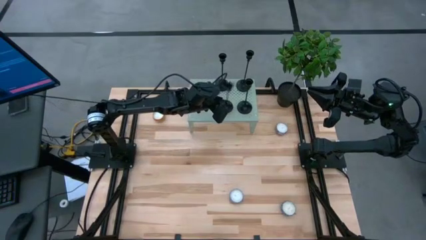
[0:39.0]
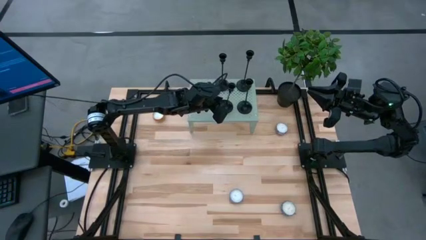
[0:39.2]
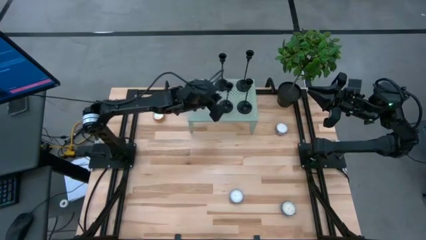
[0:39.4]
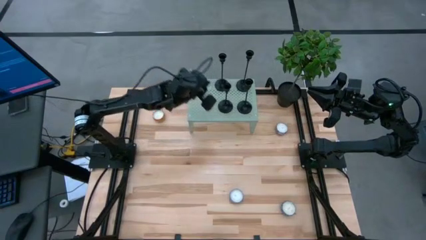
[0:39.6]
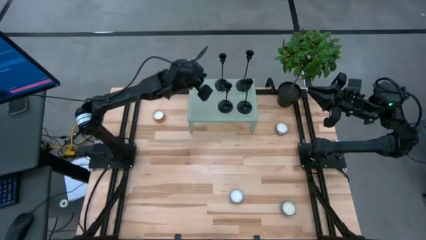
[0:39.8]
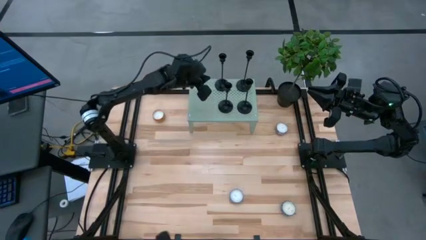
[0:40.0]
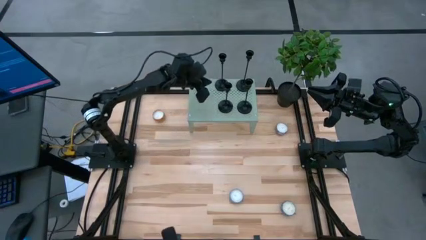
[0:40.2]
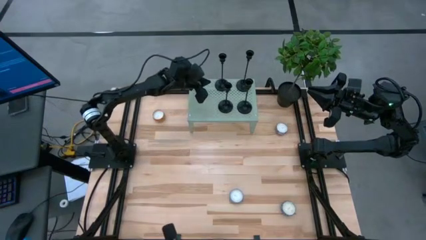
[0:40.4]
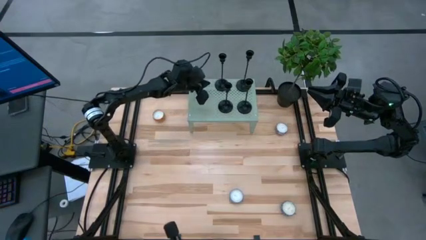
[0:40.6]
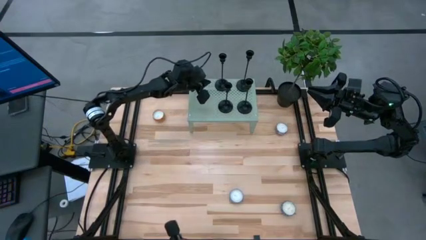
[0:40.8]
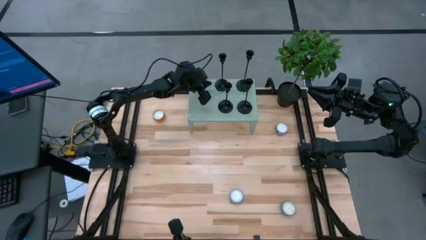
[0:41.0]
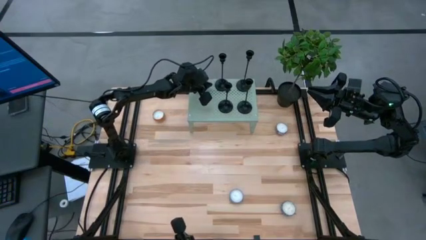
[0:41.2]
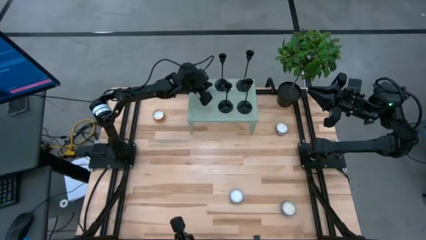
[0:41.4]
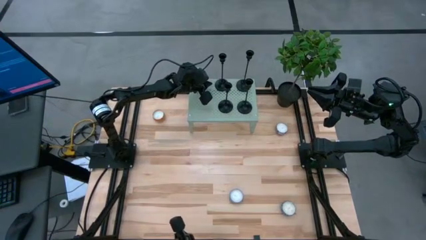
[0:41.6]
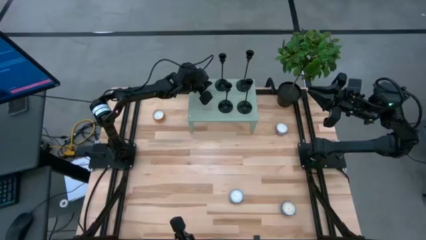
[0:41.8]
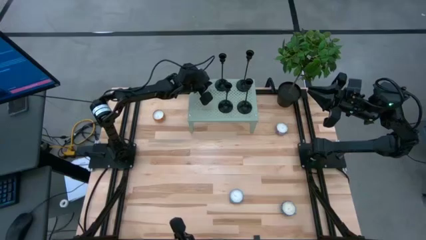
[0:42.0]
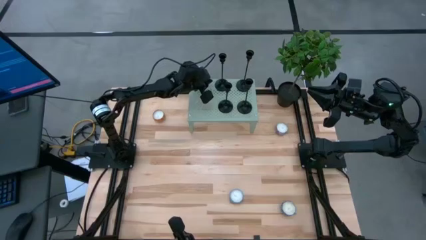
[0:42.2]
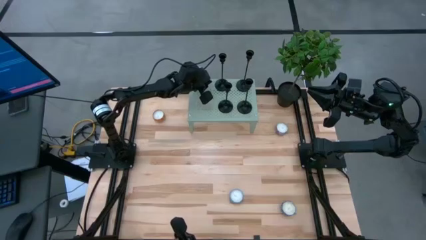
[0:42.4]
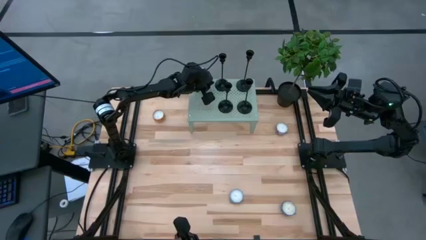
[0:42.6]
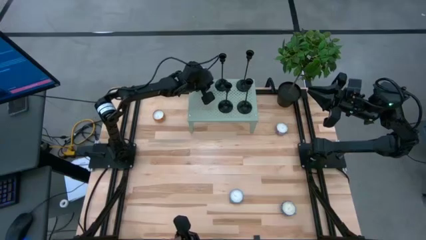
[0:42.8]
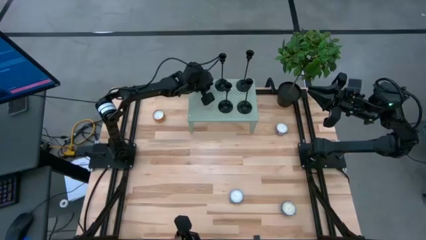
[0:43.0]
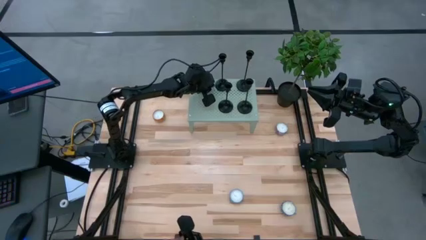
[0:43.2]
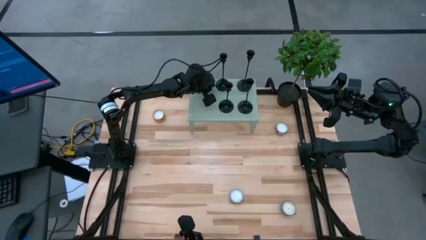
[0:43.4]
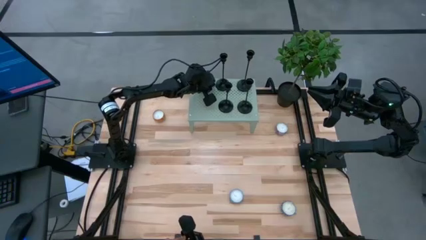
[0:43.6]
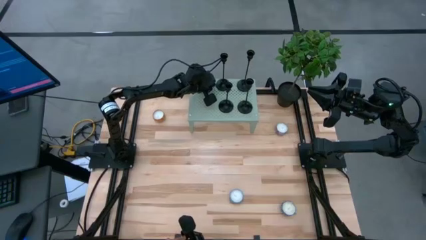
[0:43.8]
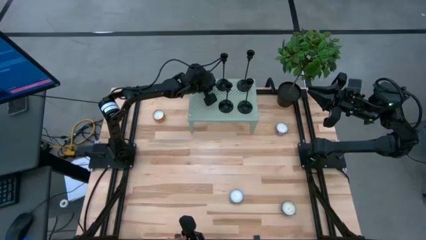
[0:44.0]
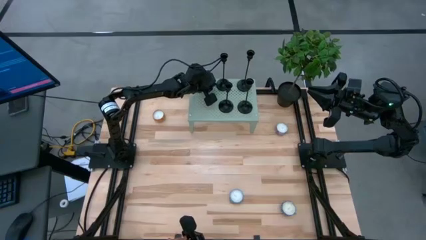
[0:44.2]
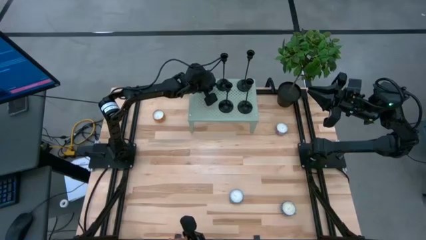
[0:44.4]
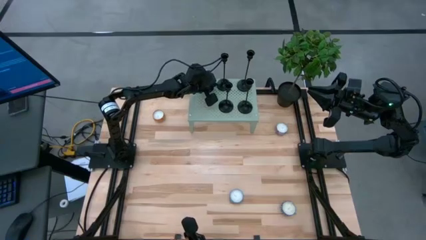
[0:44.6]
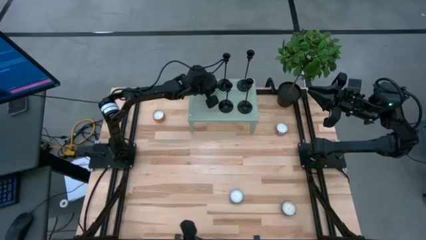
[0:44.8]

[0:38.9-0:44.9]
Task: Pick & Place candle stick holders
Adjust the black candle holder on the shelf

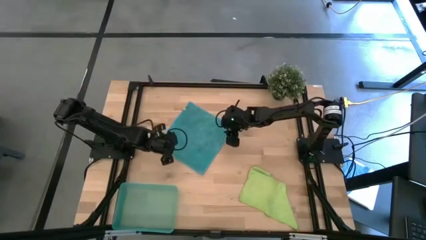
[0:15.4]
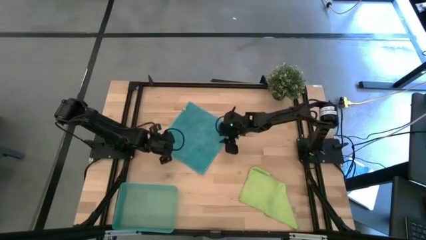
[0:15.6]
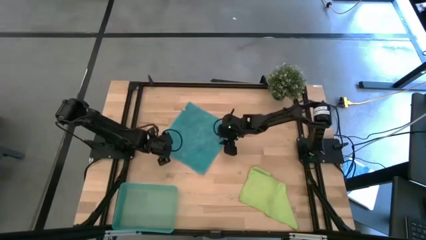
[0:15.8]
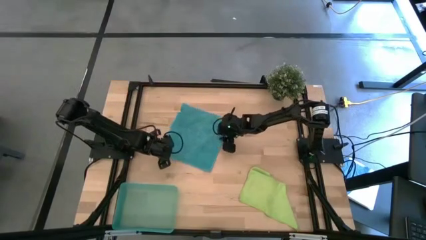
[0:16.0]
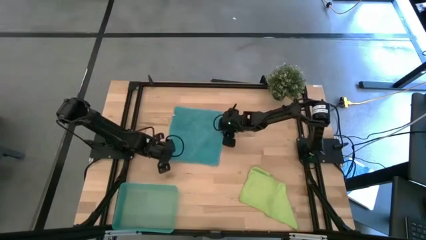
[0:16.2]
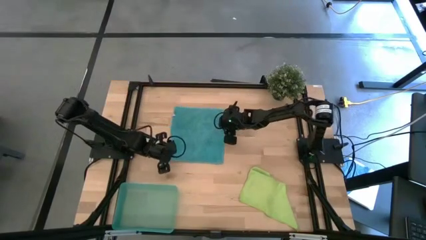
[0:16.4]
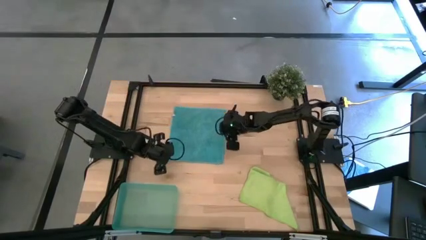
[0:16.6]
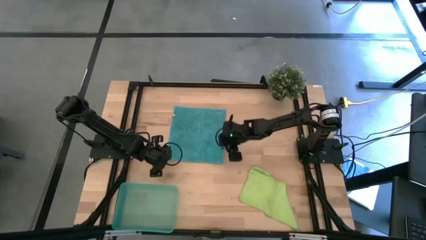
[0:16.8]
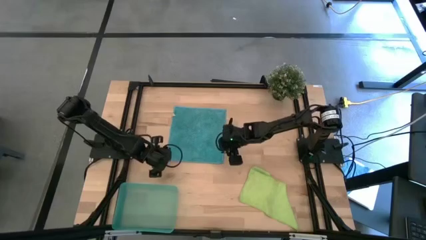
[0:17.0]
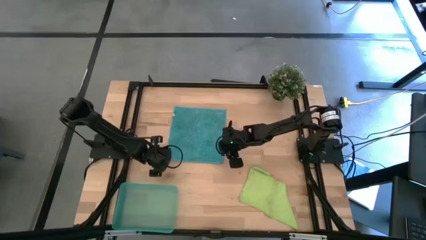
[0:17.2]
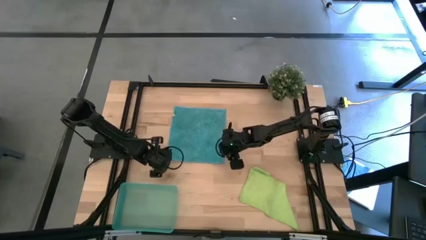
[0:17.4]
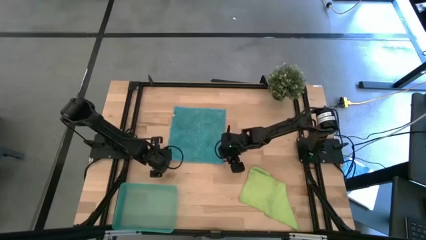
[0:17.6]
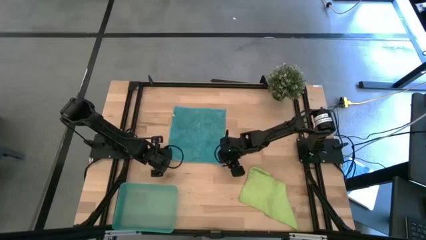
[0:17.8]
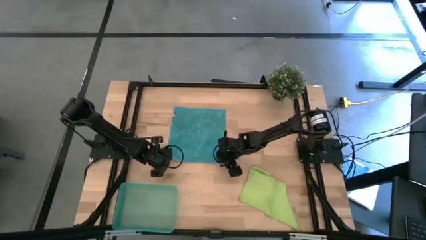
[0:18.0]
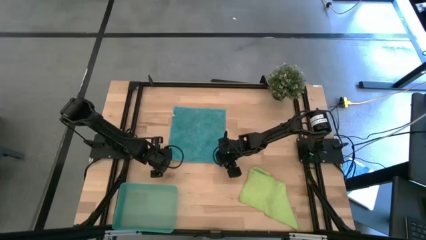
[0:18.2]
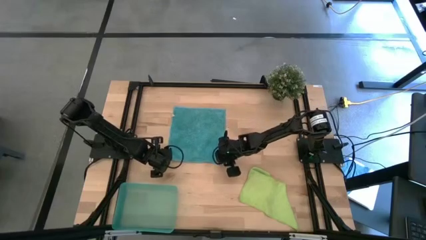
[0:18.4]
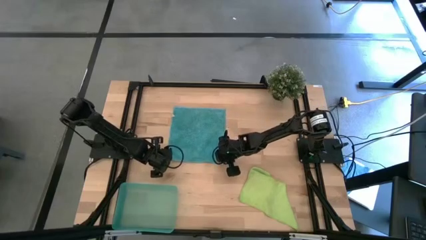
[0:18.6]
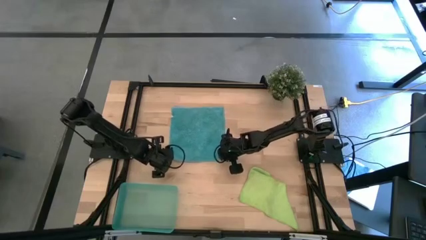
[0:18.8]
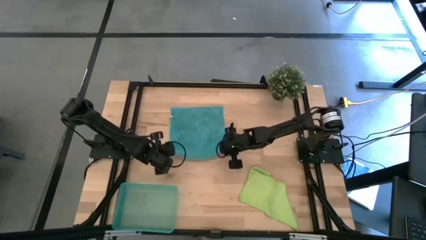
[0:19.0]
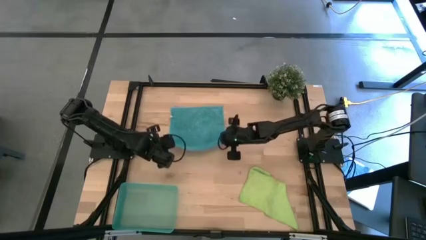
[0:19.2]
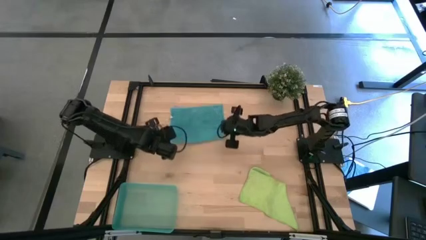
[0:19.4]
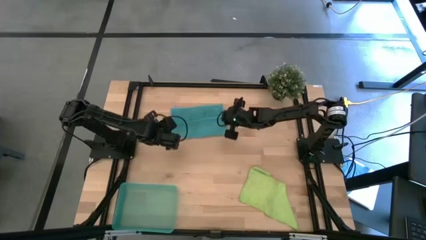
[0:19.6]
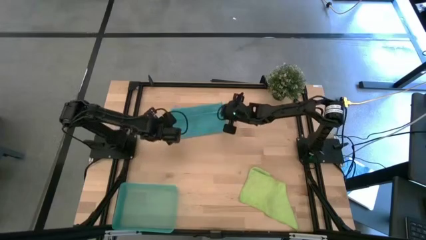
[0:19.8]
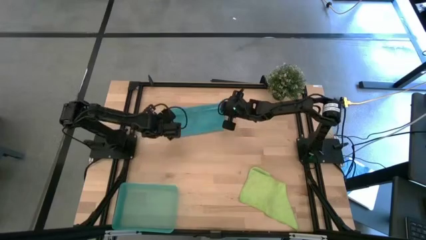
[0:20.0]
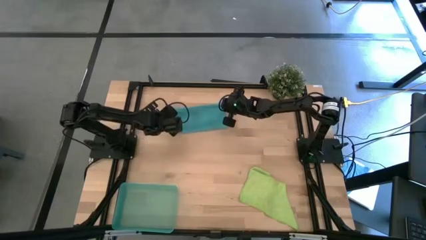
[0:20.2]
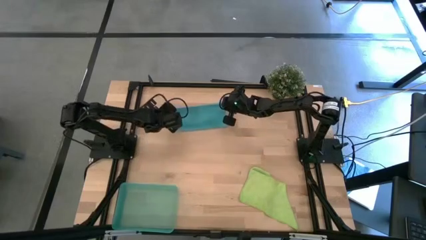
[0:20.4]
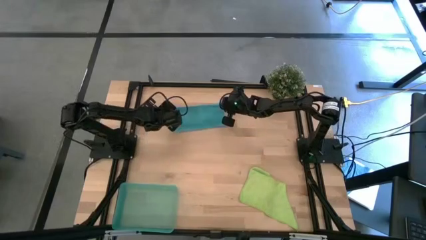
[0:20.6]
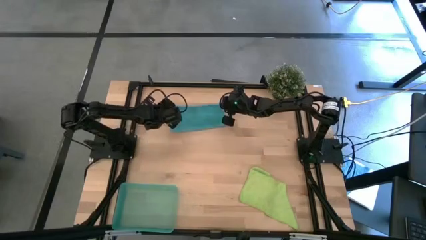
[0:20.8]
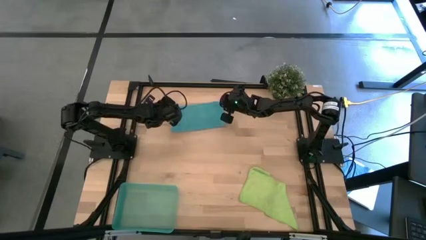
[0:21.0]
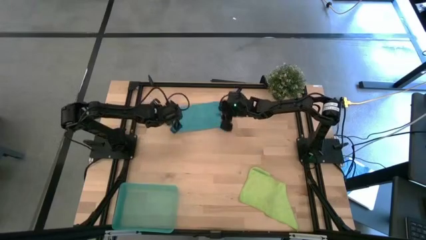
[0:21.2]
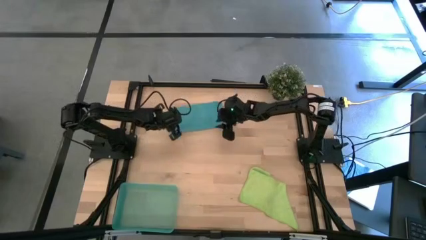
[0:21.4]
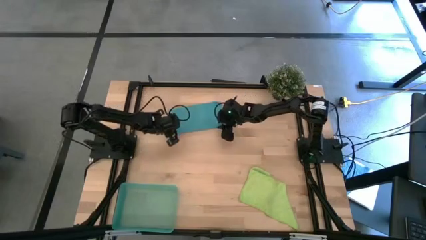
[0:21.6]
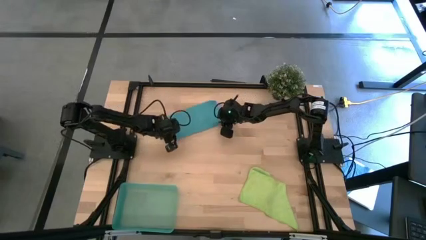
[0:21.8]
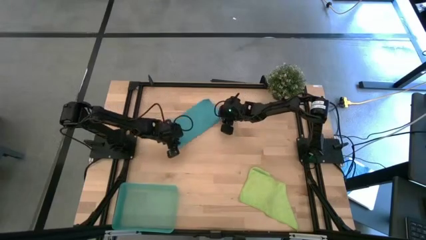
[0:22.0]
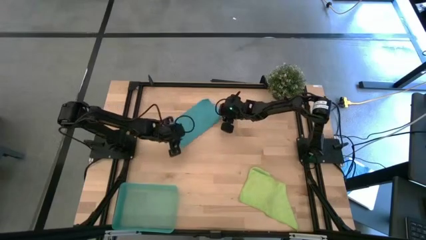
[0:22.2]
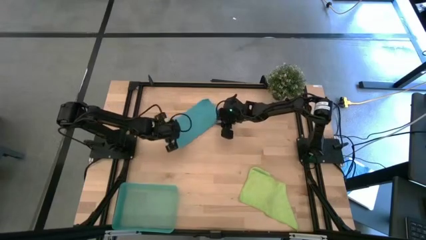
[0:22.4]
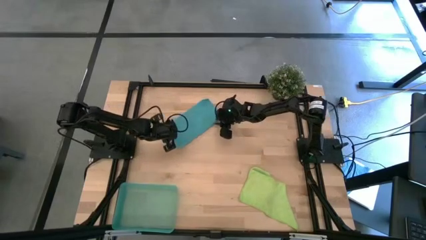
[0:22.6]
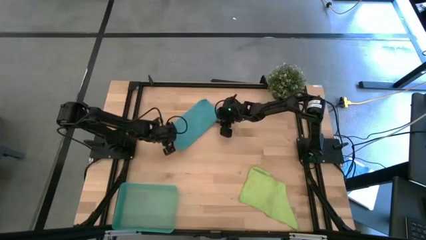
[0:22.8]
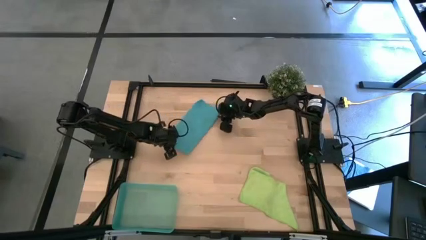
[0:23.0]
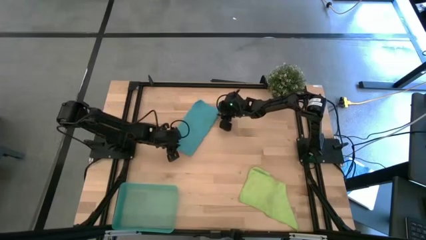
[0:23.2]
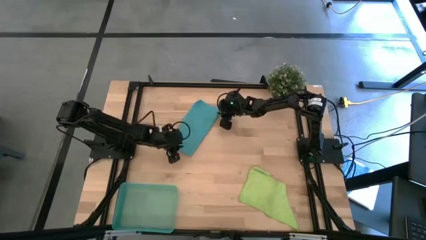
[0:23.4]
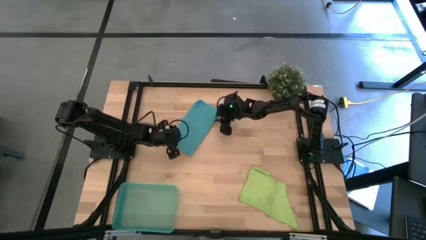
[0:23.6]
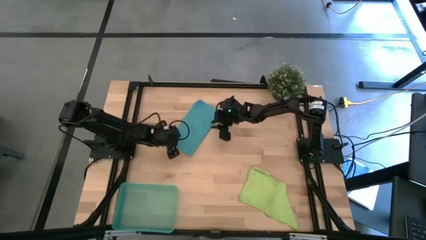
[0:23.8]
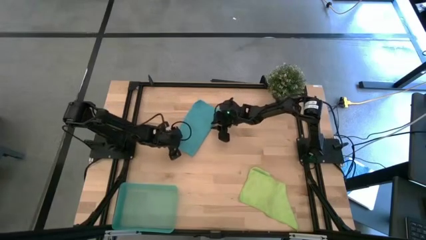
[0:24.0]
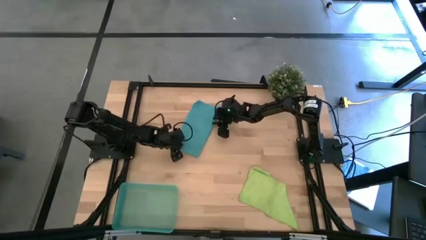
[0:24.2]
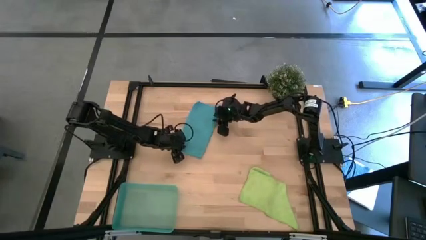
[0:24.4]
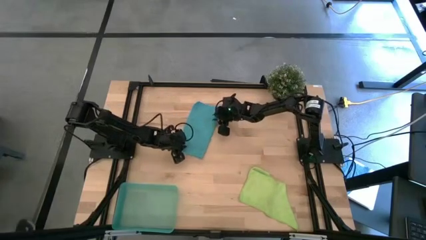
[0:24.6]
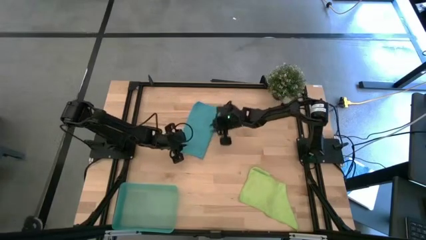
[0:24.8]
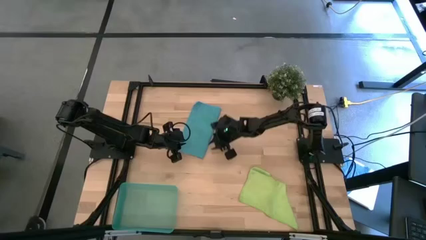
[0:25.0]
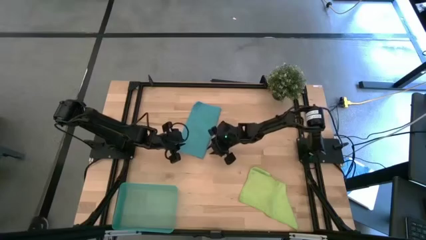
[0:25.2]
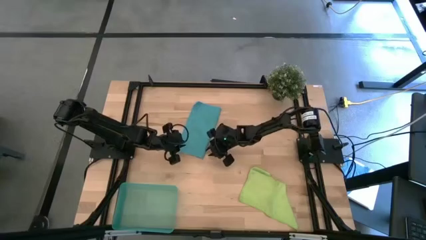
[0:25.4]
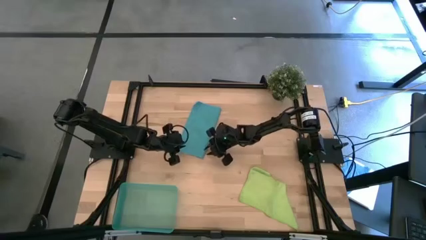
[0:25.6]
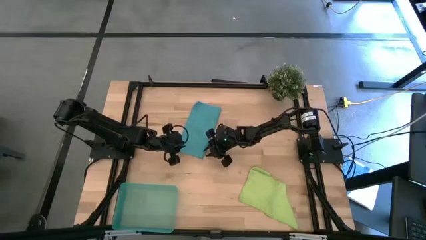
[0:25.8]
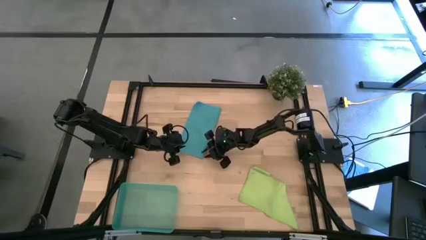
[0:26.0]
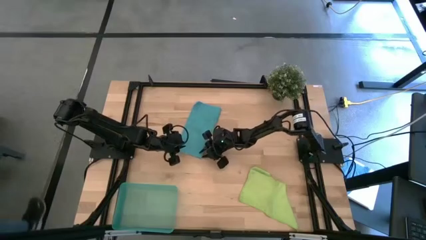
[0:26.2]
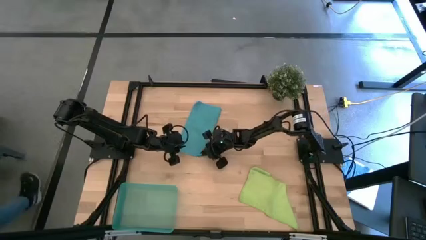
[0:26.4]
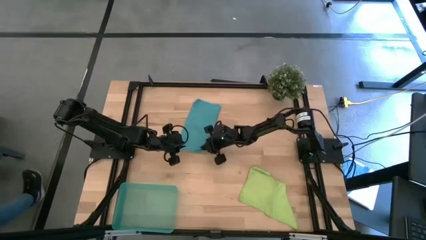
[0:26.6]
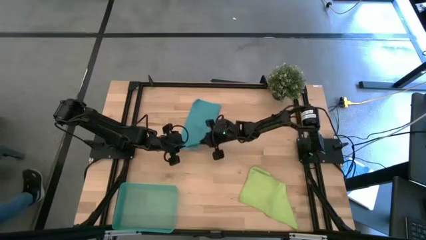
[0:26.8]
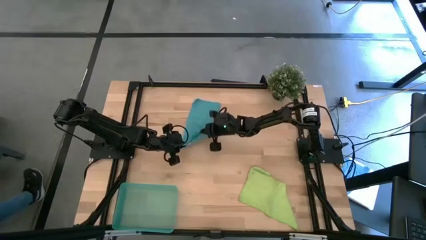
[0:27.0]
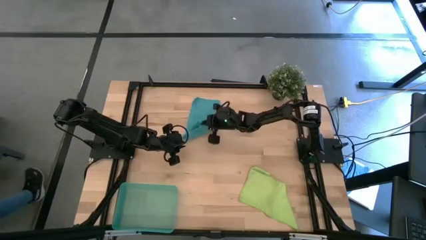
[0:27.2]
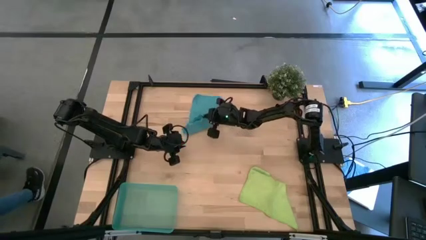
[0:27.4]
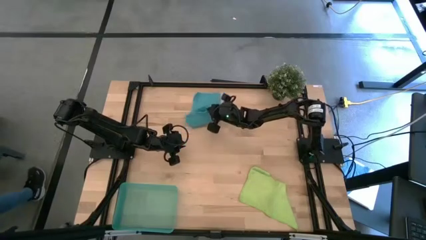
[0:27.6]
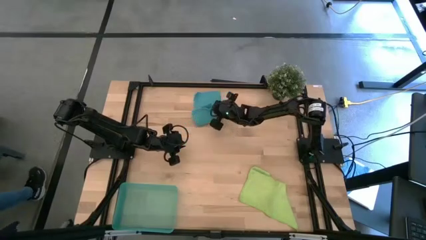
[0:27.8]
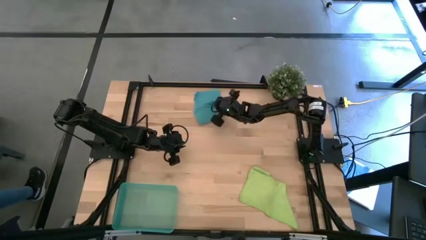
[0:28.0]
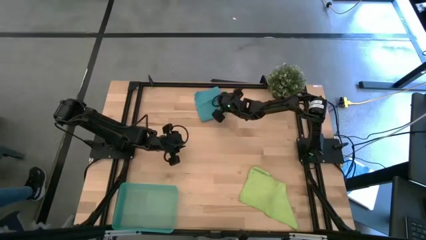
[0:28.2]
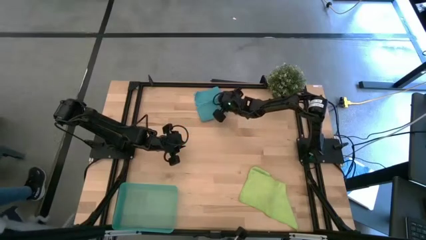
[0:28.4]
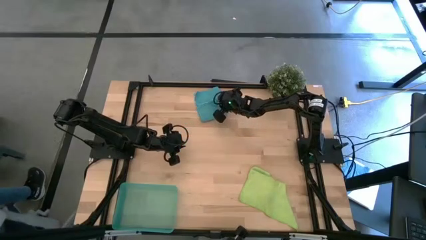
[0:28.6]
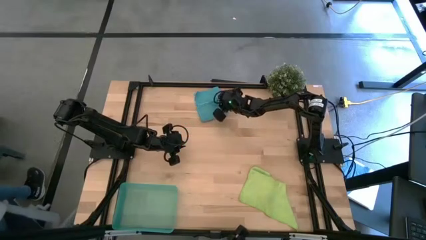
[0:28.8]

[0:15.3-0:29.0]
Task: Roll microfiber towels into tight, uniform cylinder then place into a basket
Fold the blue microfiber towel
